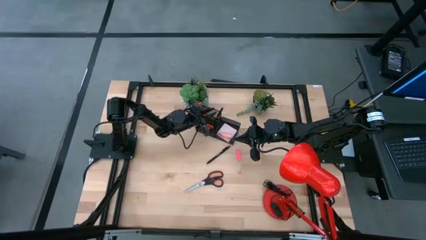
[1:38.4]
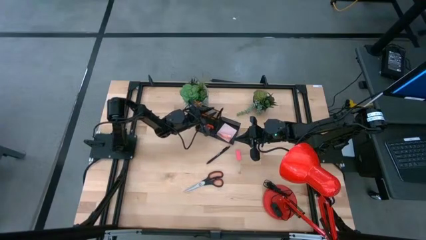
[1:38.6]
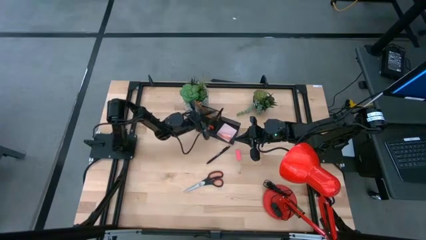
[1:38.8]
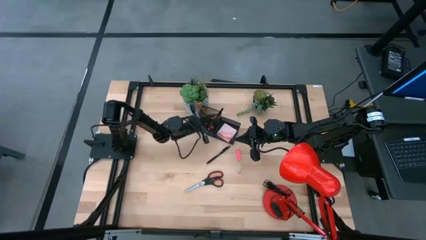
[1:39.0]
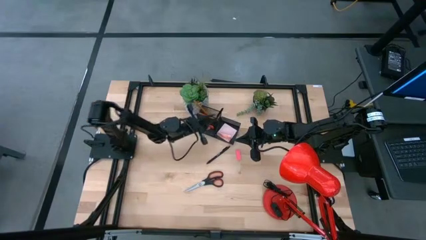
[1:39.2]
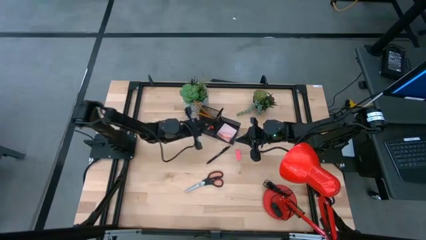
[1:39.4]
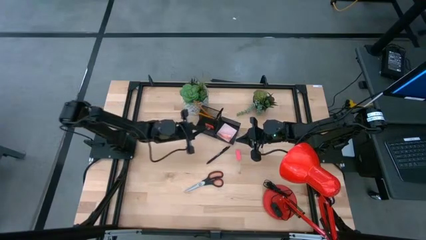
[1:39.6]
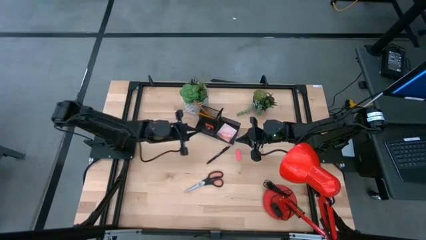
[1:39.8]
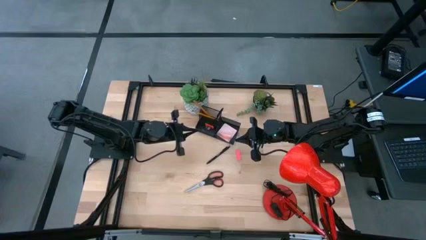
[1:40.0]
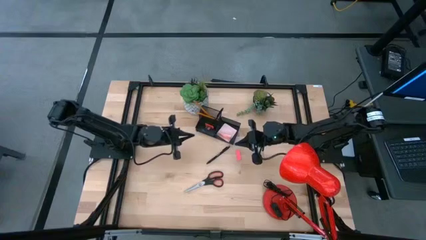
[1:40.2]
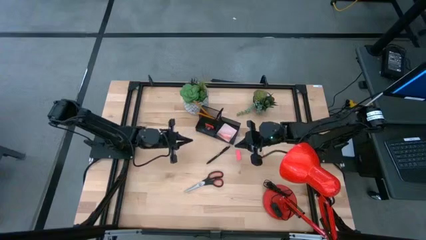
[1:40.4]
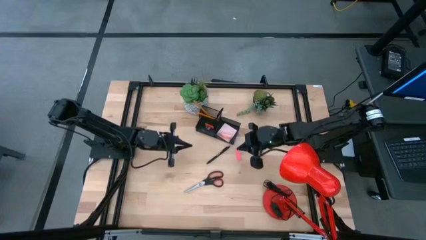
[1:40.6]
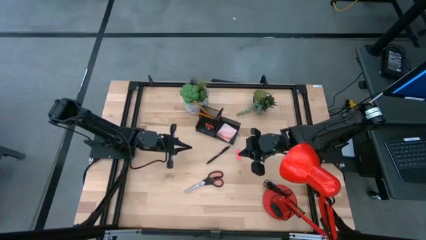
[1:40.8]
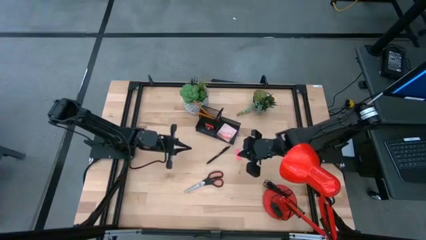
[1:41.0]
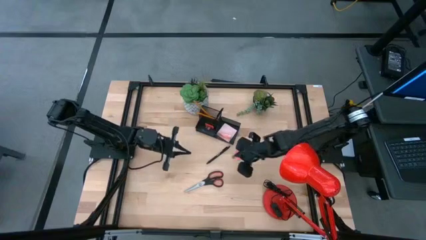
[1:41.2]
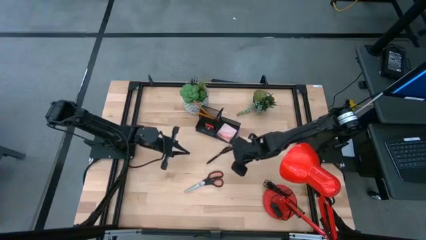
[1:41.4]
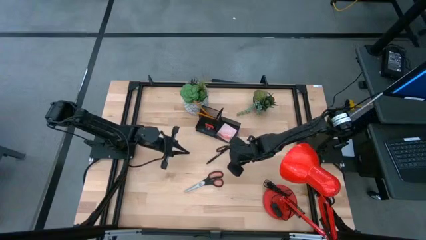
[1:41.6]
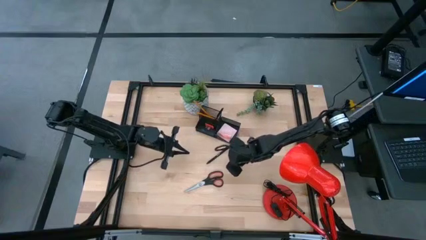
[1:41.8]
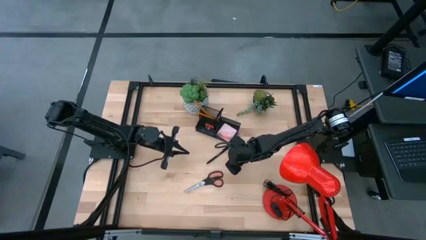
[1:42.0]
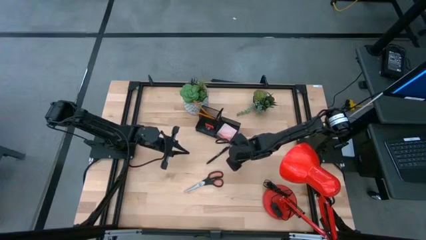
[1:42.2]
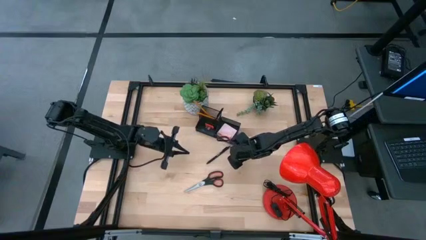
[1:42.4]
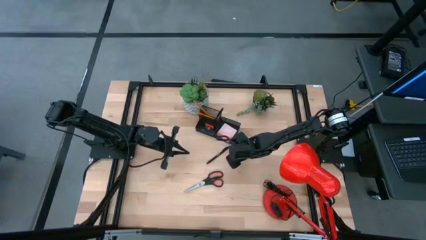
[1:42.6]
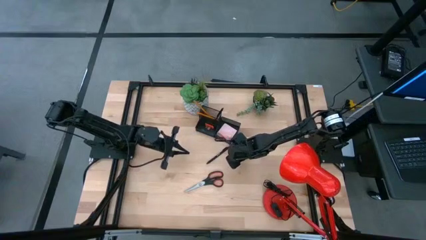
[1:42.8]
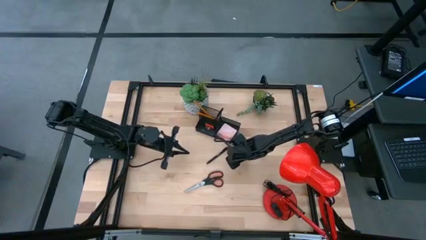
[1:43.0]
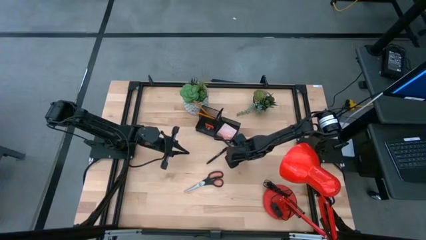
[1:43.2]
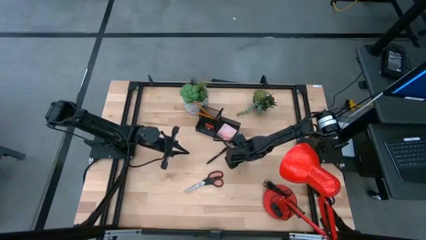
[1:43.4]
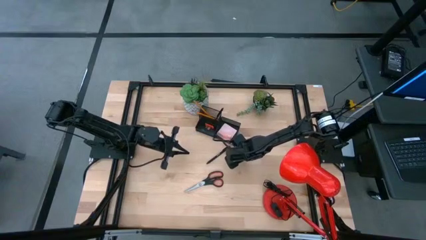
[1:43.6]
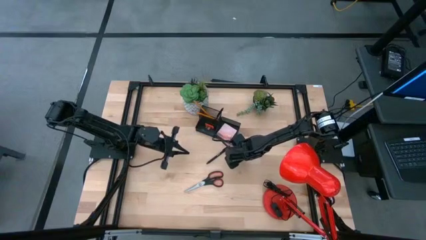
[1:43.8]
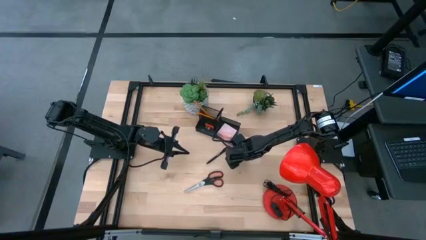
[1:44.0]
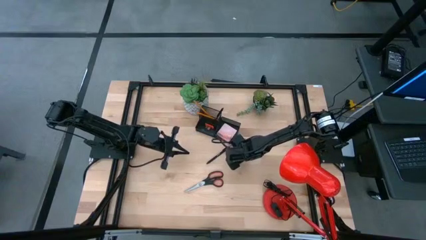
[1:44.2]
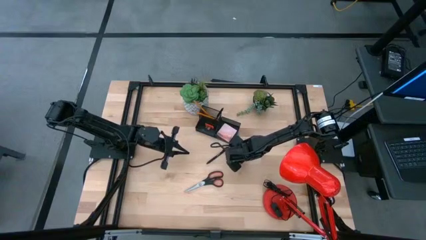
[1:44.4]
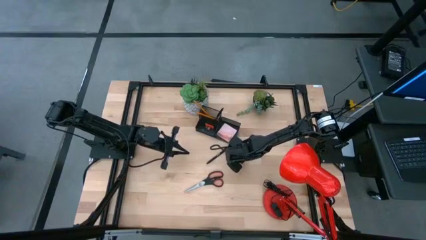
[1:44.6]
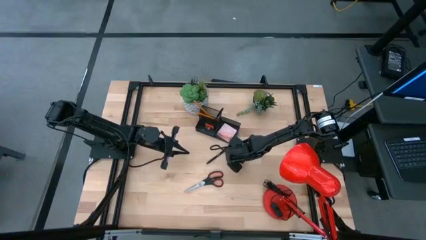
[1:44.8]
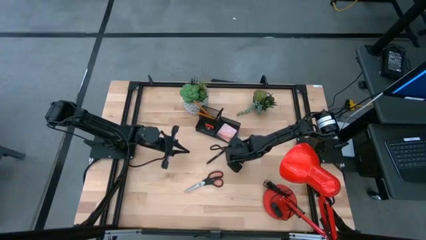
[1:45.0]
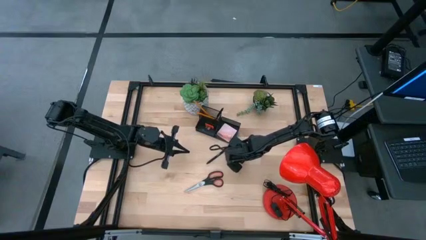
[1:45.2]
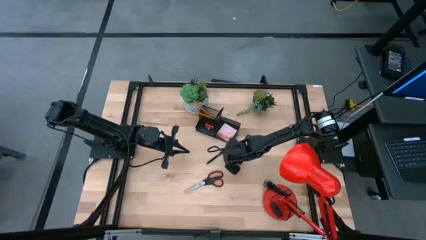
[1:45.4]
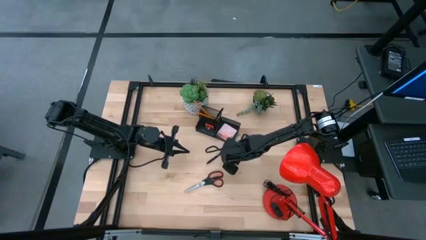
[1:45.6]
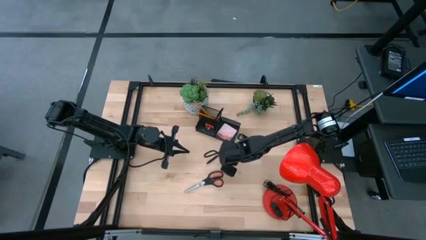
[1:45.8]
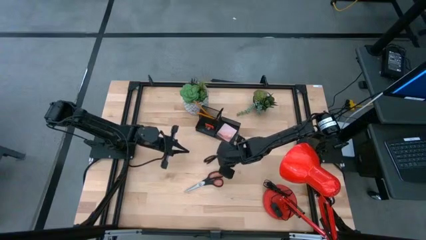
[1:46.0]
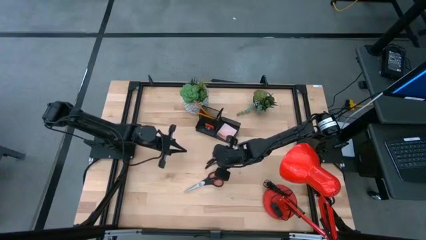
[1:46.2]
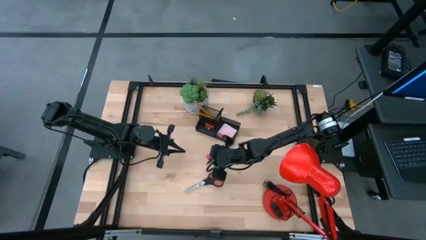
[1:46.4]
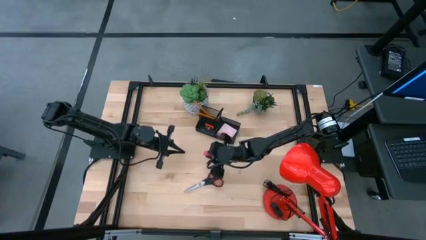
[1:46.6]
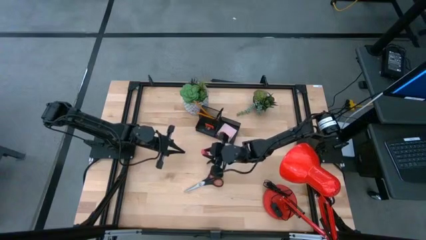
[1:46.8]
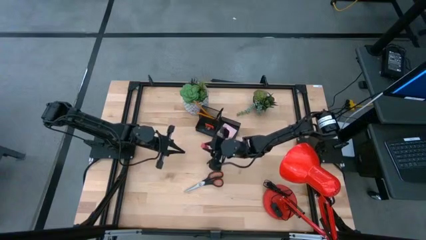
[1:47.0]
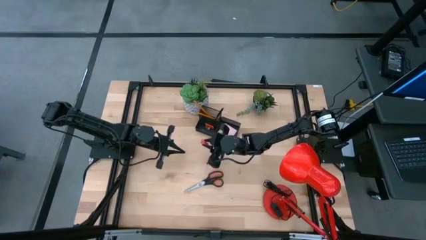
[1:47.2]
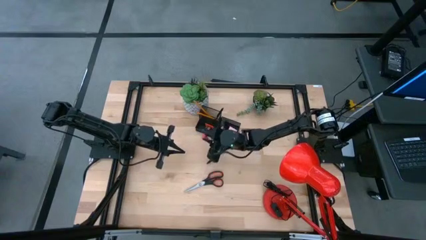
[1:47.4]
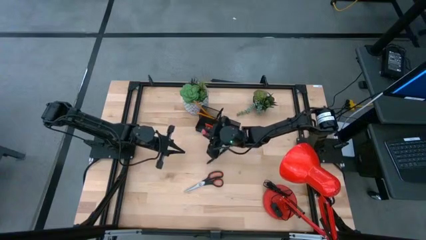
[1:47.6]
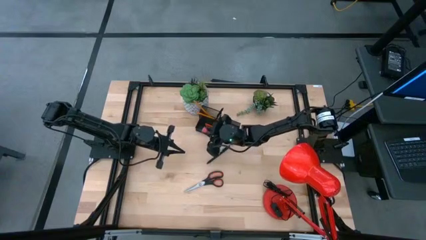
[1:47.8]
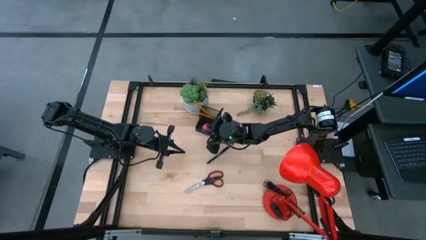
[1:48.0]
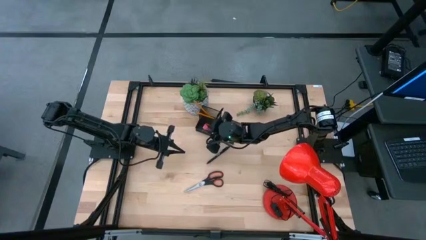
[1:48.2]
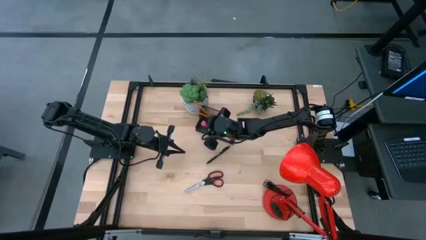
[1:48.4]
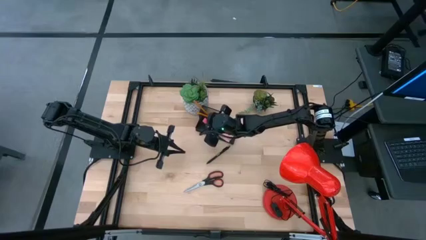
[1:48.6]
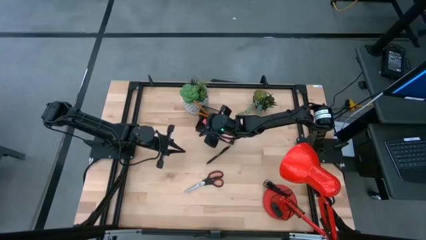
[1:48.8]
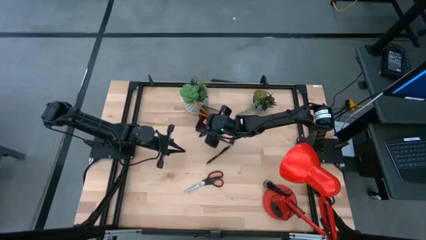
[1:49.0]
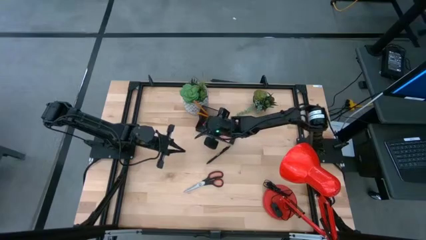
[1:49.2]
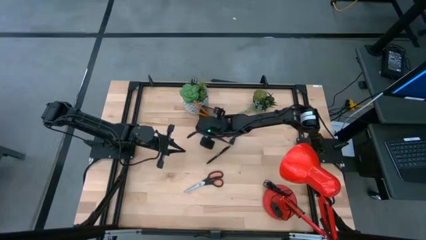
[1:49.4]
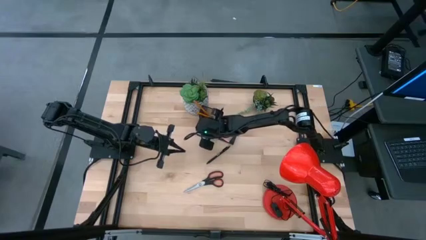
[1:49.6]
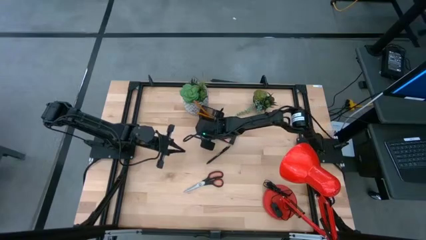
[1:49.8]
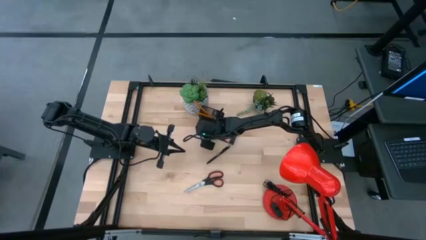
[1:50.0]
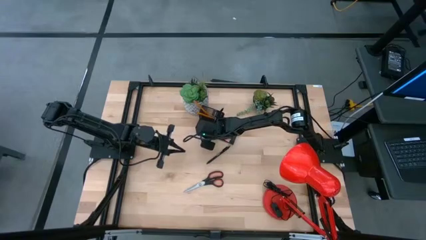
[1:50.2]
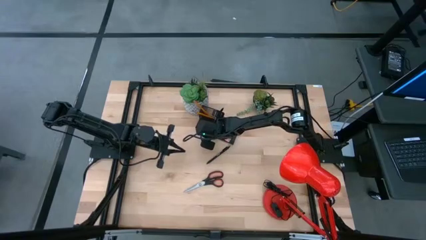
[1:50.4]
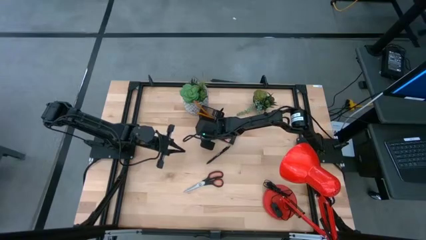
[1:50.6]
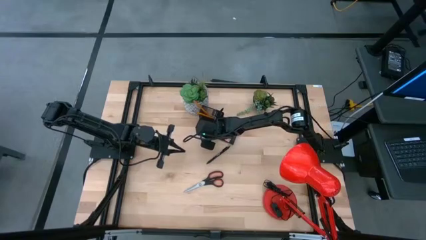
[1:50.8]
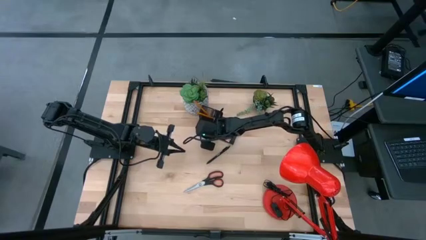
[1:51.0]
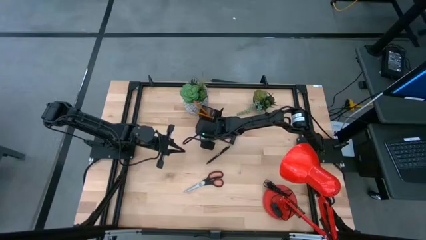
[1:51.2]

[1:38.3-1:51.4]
Task: Pick and place office supplies into organizer
Put the pink eraser into the black desk organizer

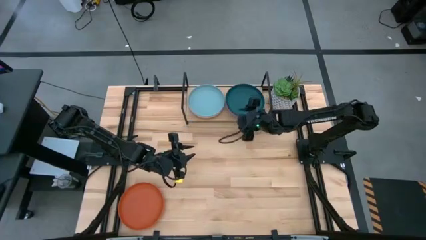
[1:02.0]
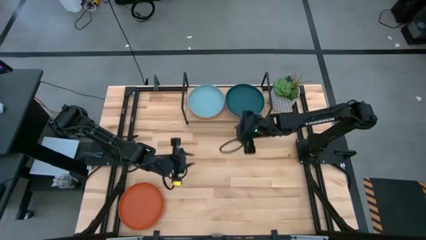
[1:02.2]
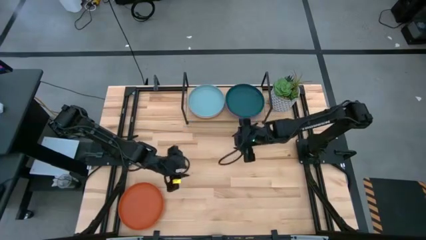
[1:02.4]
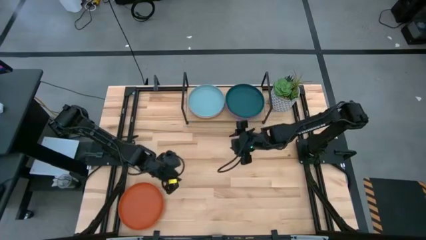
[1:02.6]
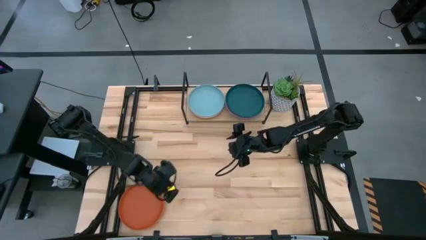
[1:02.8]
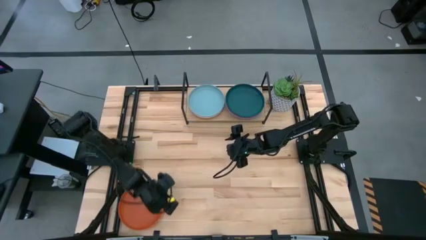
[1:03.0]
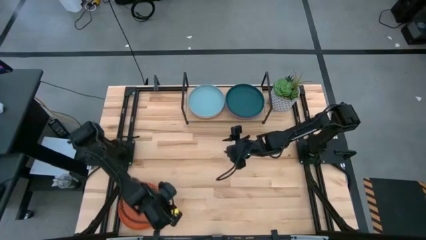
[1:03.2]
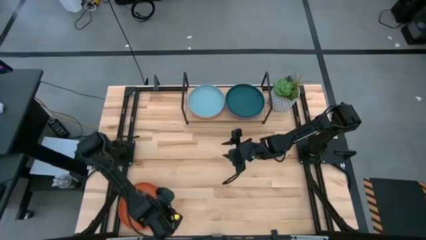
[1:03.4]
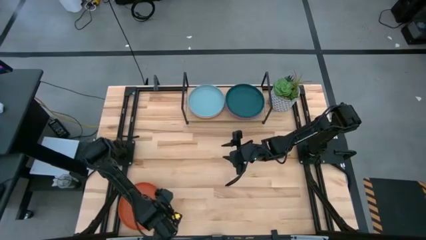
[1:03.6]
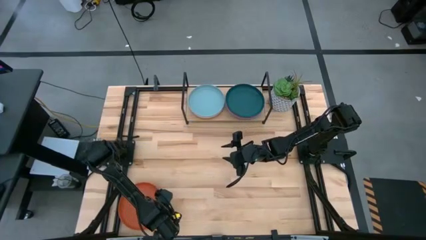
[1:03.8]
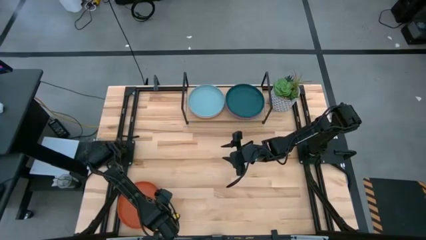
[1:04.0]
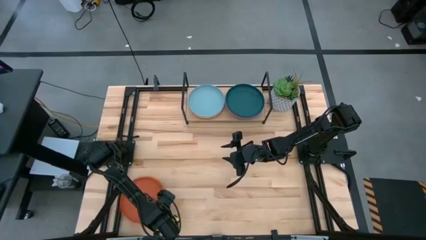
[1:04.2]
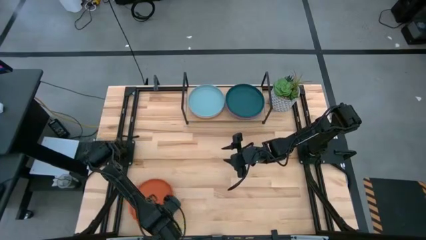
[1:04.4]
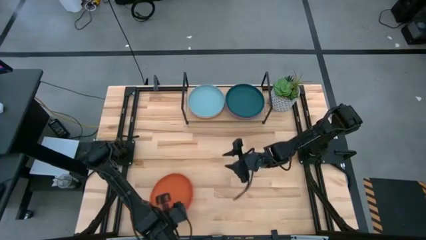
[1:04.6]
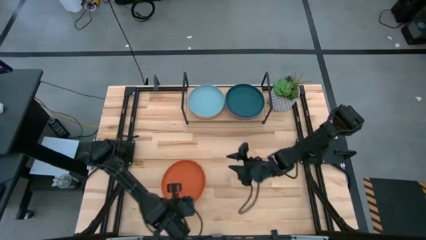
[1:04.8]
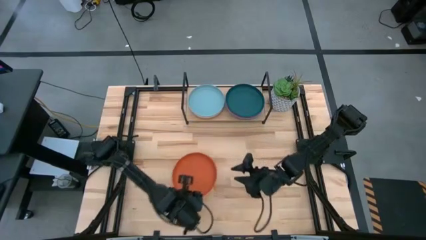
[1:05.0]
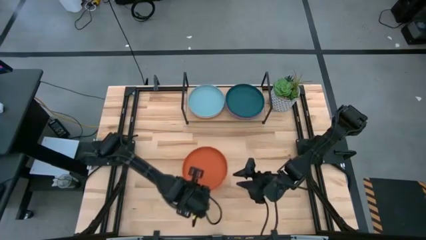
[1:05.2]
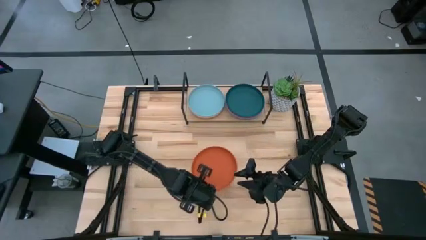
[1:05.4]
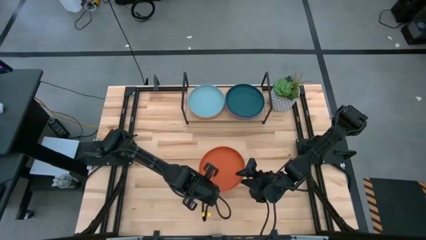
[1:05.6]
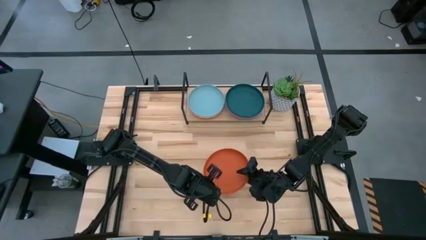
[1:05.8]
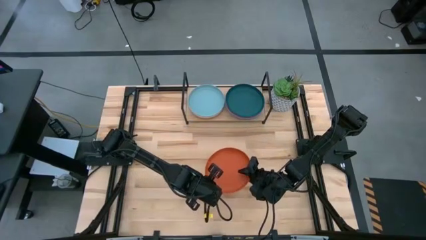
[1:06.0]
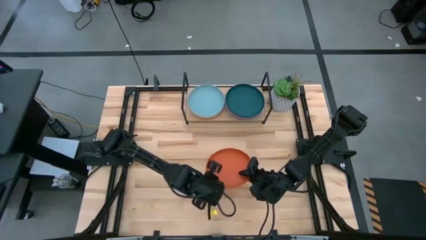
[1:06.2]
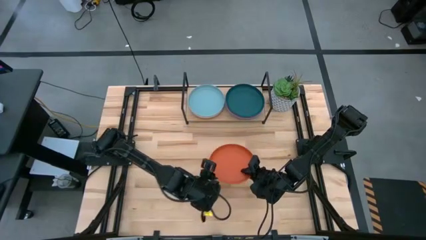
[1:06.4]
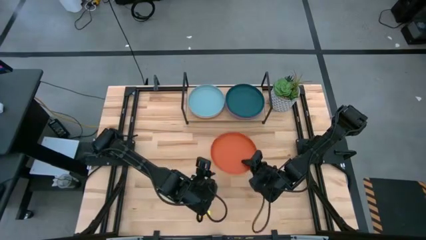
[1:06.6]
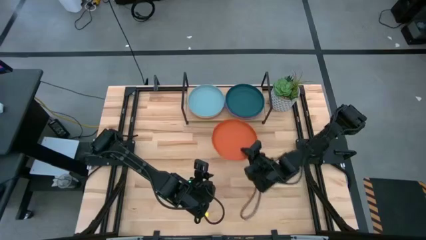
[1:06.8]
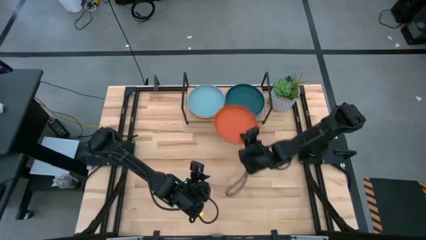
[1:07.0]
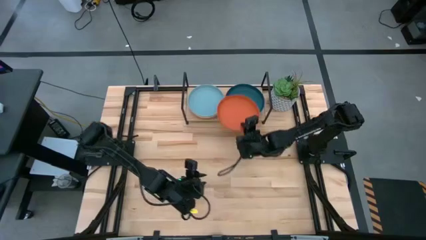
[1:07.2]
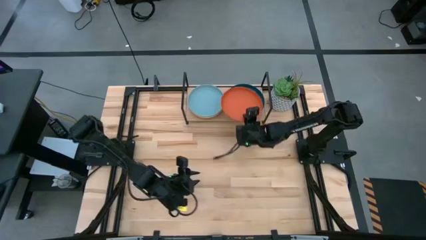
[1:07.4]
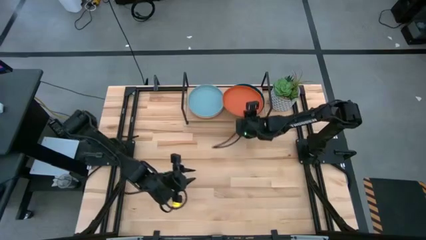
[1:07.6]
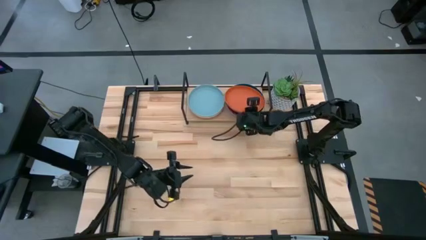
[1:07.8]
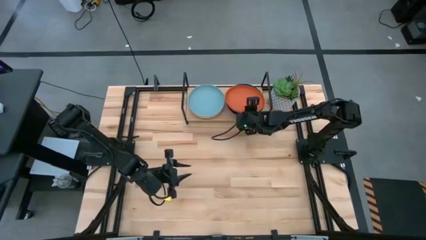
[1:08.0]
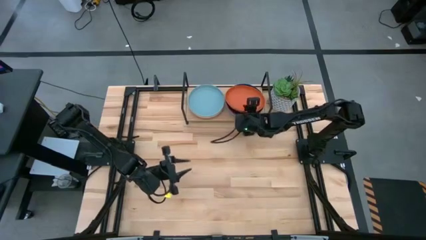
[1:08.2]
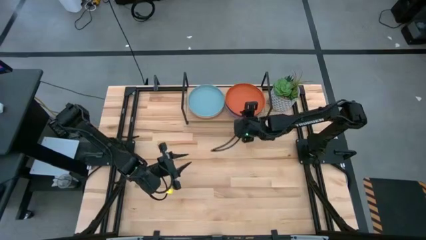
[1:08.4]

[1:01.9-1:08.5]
Task: Place and stack plates onto a shelf
Stack the orange plate on top of the dark blue plate on the shelf
